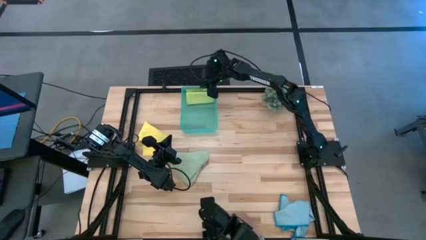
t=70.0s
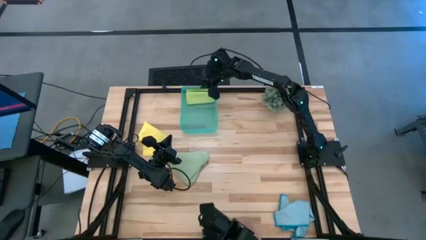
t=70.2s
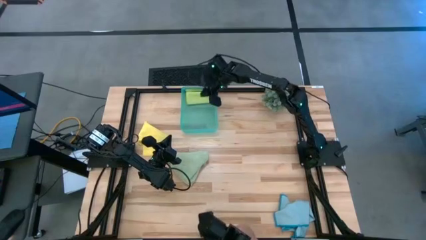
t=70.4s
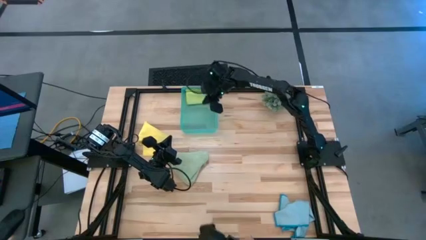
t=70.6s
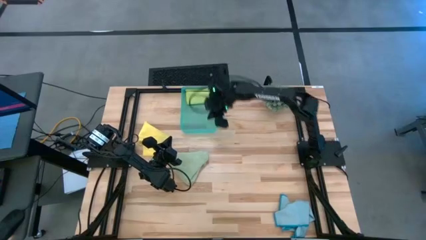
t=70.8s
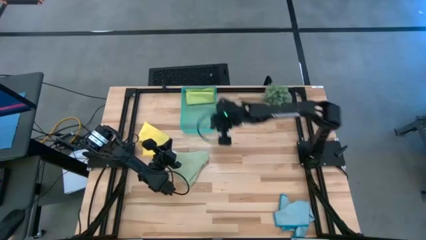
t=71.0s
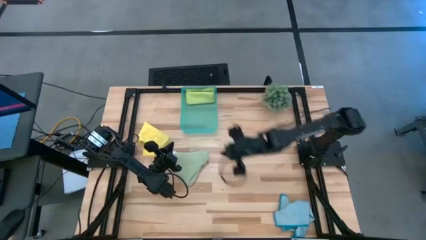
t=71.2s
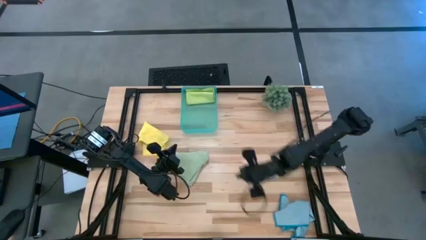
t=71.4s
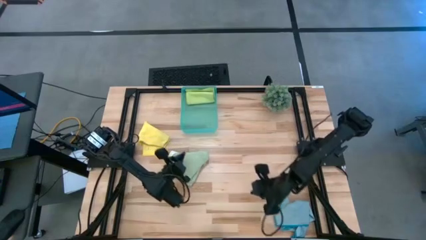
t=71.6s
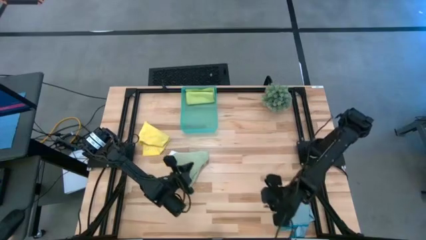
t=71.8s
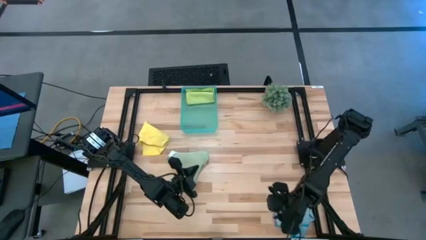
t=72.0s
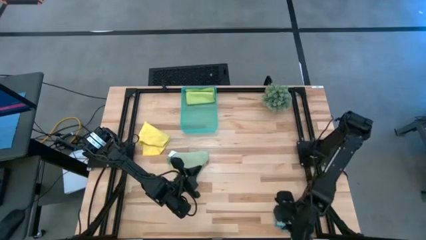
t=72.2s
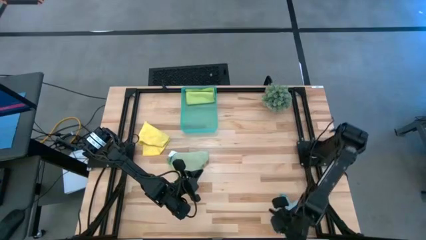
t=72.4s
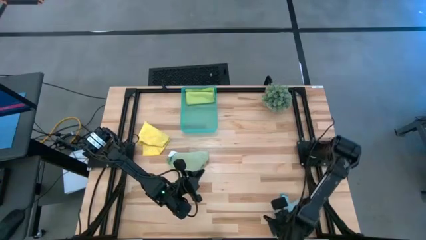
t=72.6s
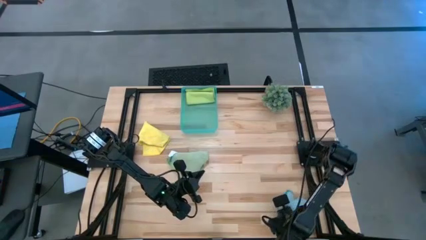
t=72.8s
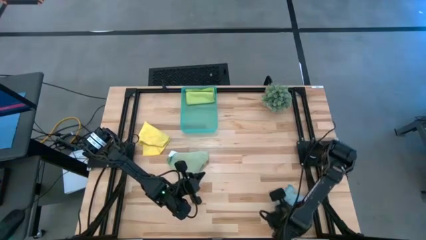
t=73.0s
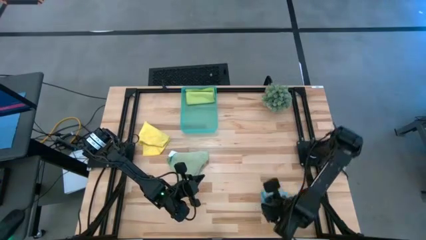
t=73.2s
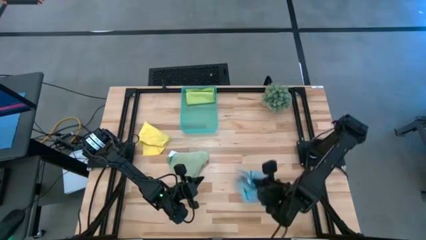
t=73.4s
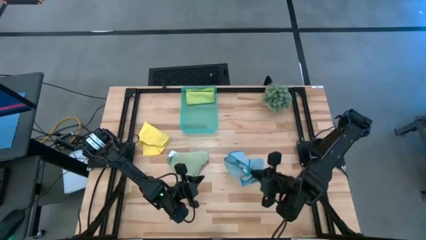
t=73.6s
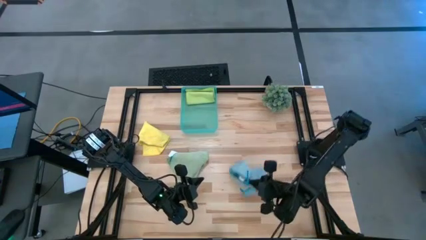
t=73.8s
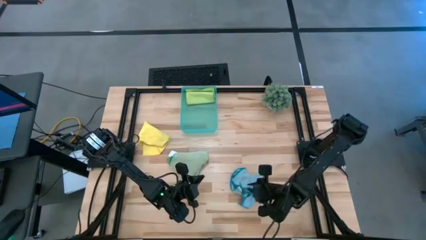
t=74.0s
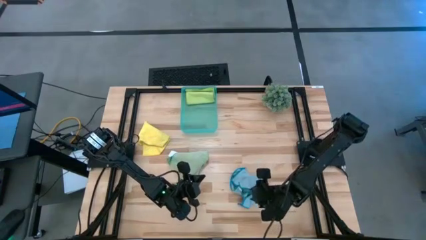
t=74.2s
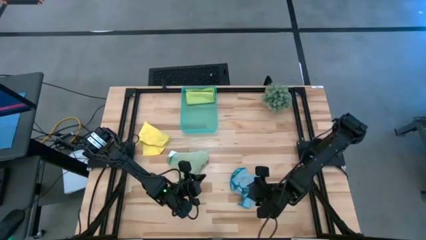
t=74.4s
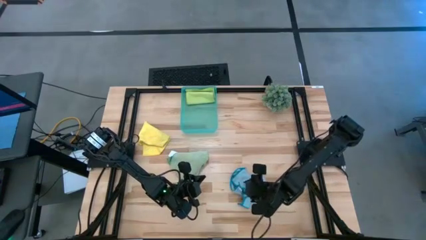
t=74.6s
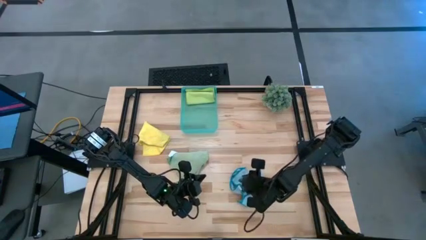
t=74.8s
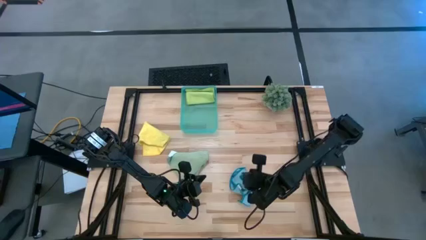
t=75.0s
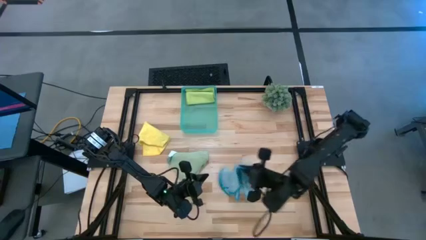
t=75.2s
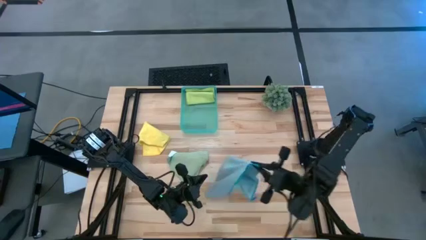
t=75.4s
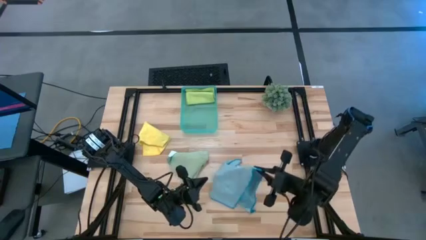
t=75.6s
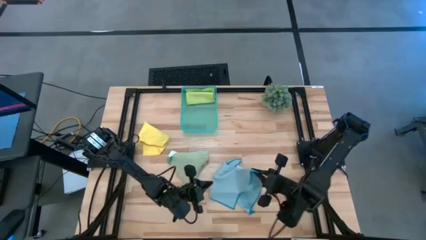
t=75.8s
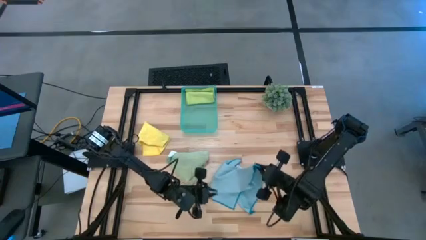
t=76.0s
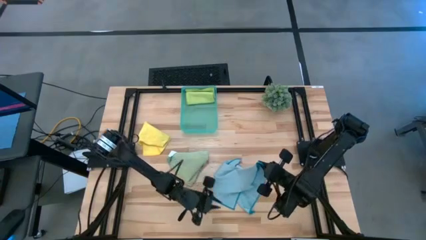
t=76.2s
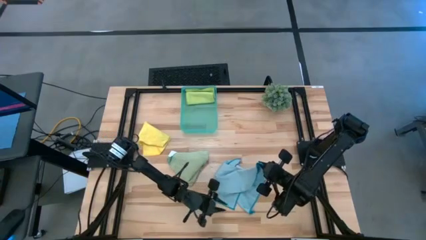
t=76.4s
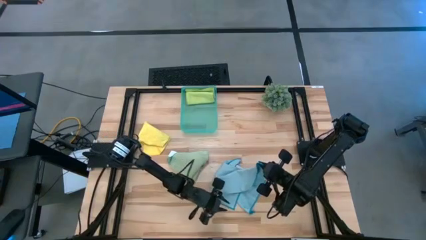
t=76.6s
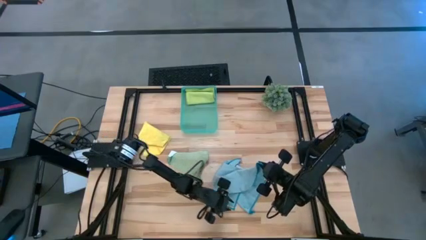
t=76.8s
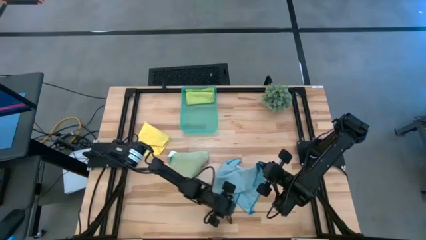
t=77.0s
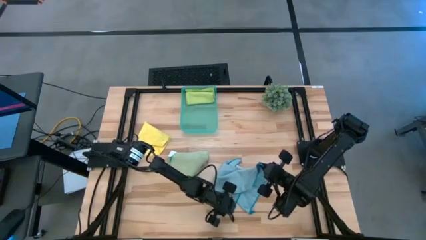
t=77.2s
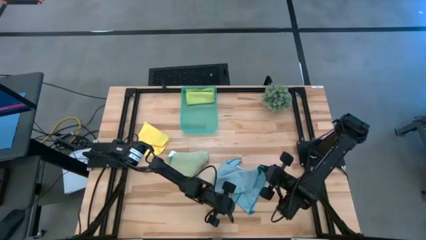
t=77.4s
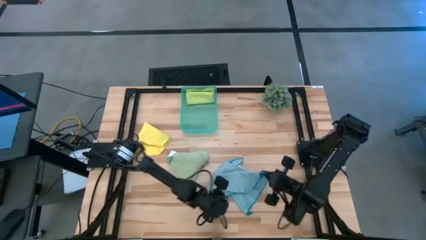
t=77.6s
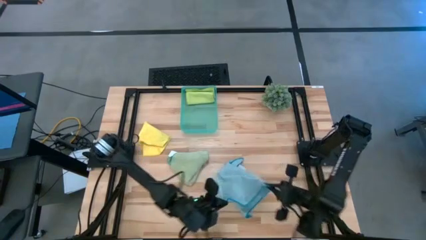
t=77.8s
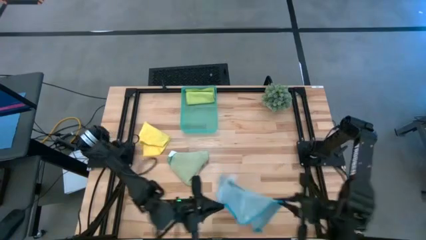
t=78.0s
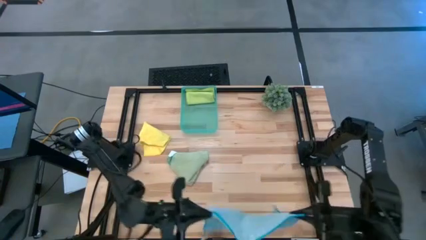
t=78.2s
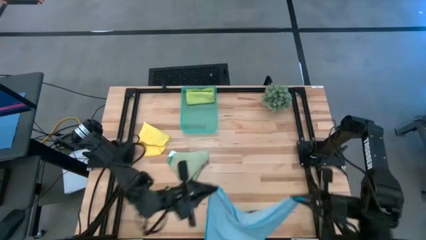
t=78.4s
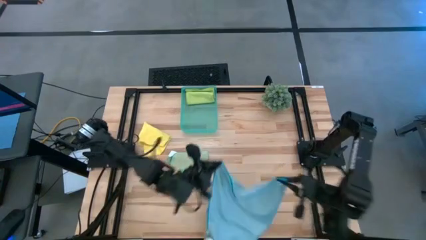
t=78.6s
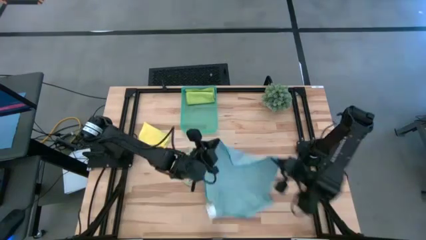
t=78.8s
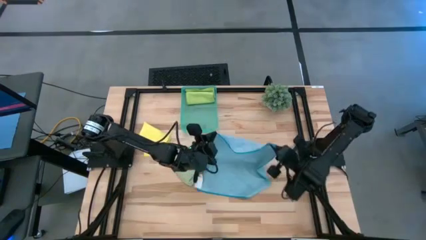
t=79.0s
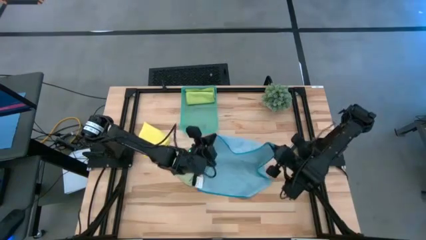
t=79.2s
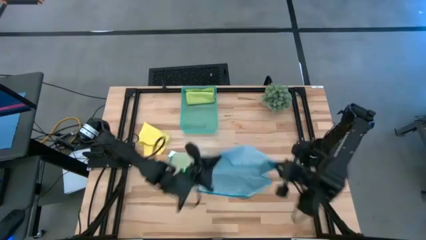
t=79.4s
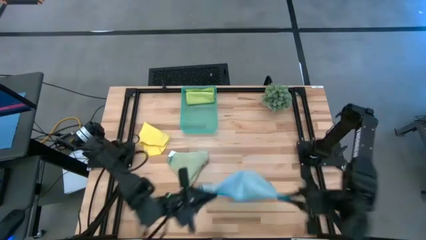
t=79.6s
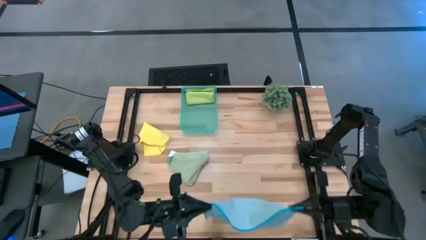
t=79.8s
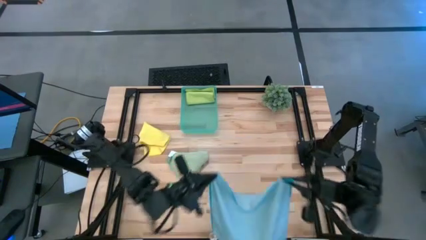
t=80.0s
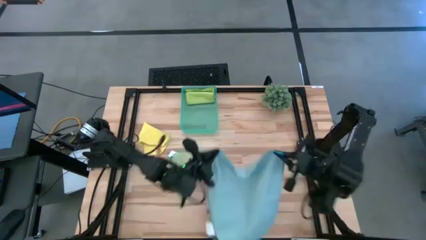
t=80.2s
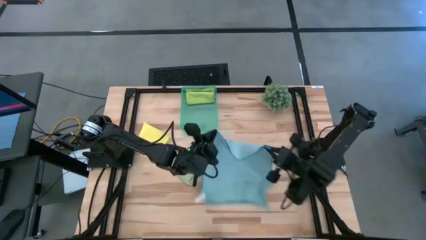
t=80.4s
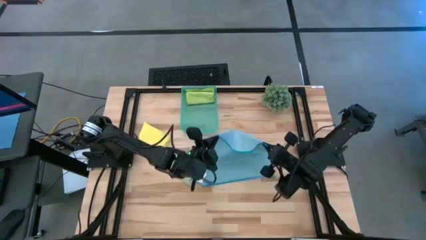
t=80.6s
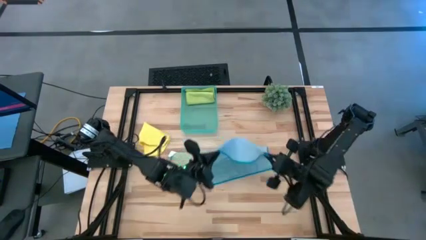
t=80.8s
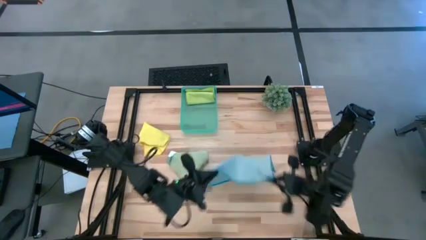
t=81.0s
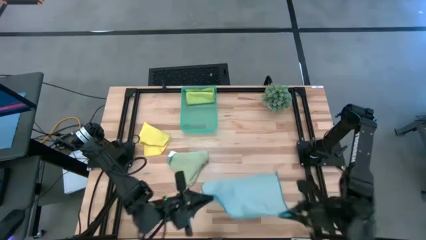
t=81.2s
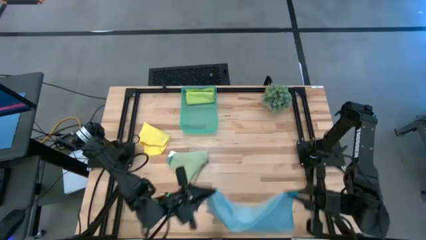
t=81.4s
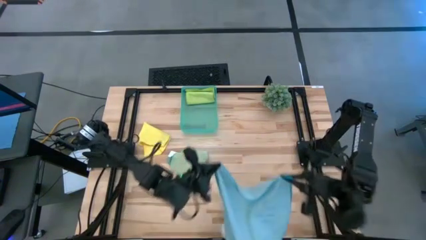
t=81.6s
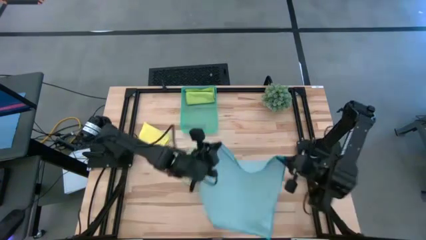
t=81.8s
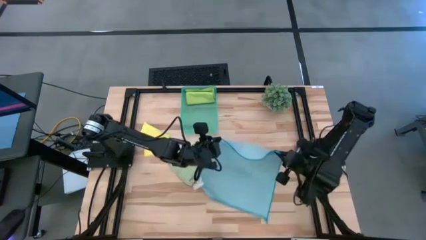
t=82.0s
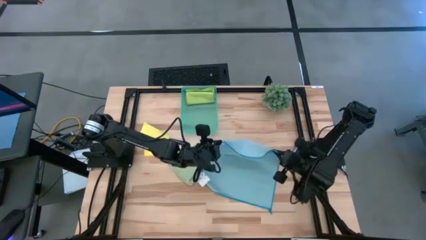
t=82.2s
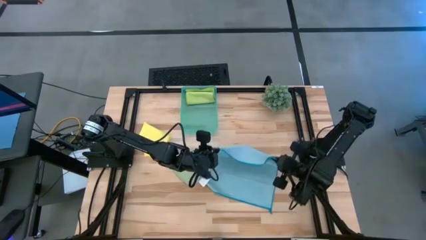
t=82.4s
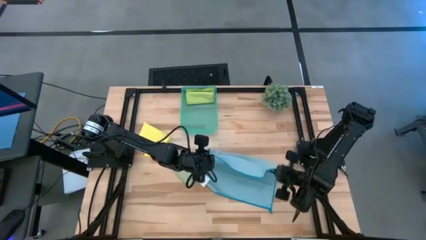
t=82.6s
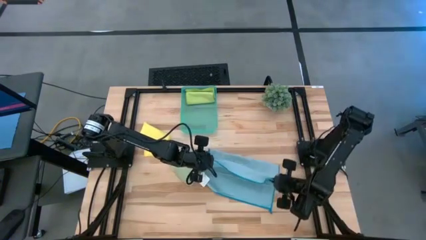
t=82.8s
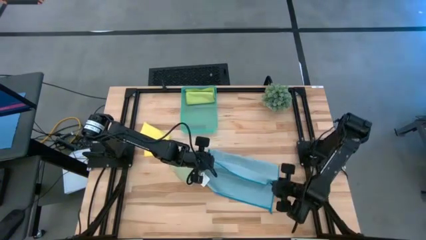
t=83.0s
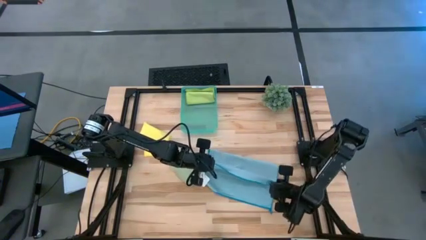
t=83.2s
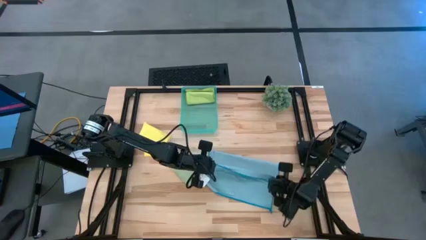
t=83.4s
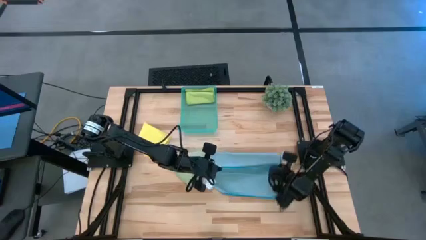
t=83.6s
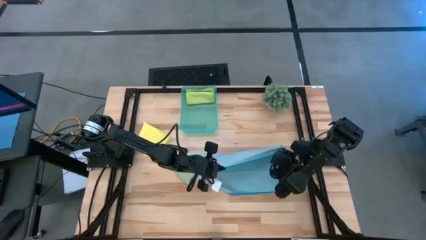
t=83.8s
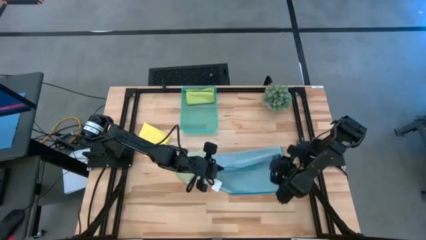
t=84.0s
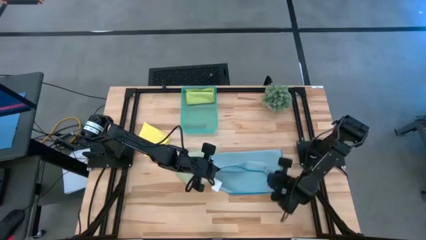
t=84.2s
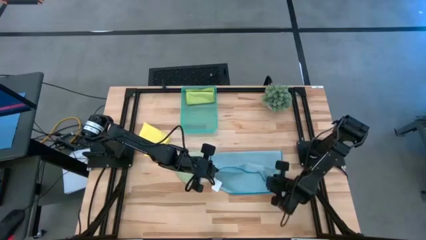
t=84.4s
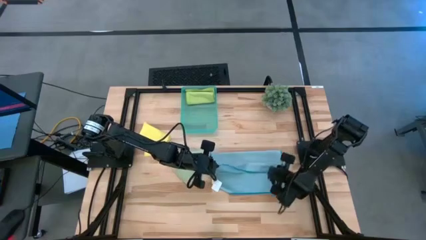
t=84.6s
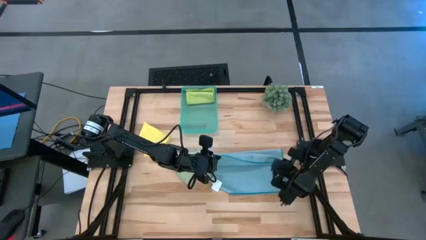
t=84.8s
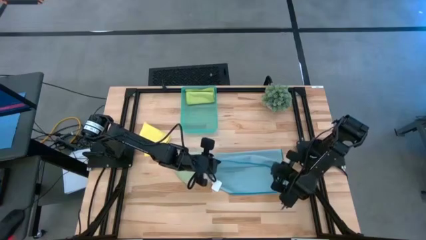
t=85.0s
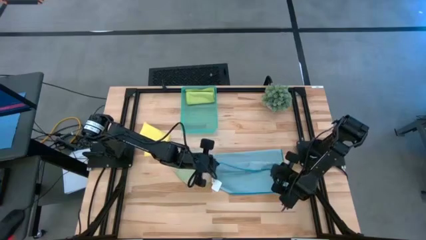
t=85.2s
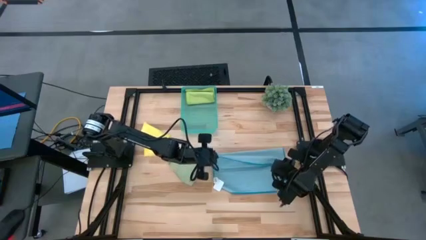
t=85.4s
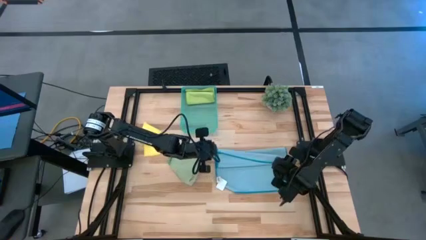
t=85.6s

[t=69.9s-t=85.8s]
Task: Fold microfiber towels
Fold the blue microfiber cloth

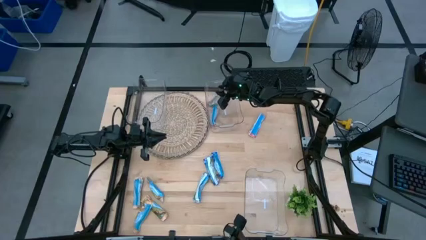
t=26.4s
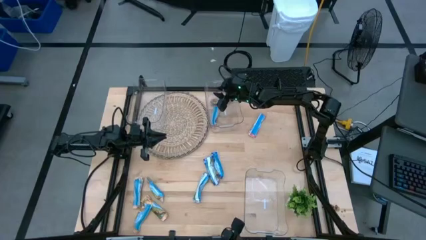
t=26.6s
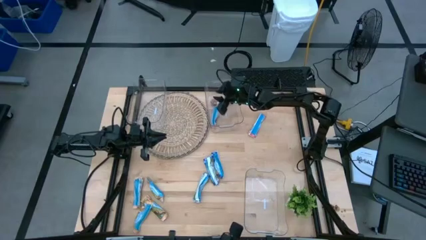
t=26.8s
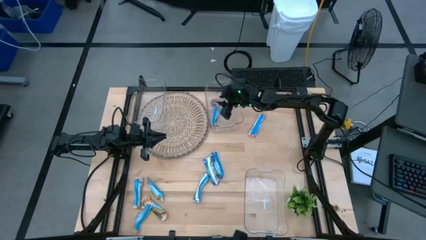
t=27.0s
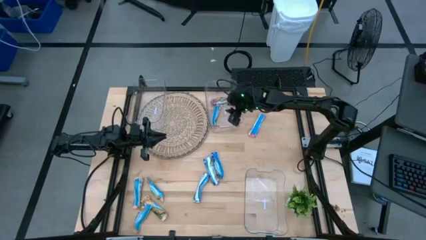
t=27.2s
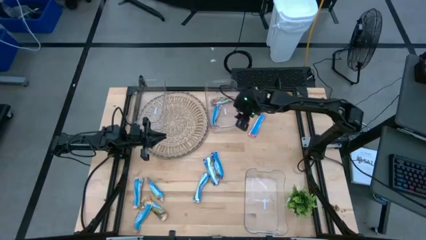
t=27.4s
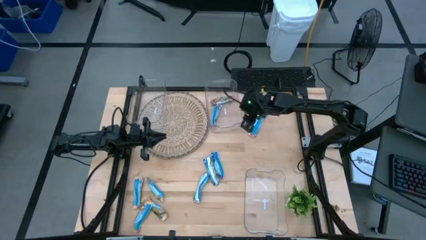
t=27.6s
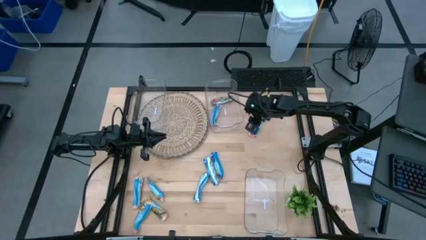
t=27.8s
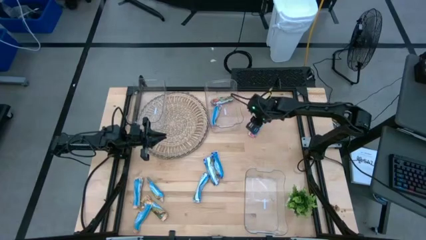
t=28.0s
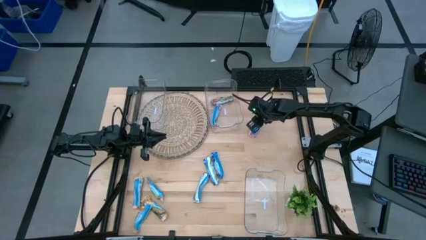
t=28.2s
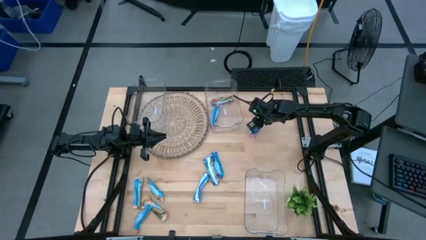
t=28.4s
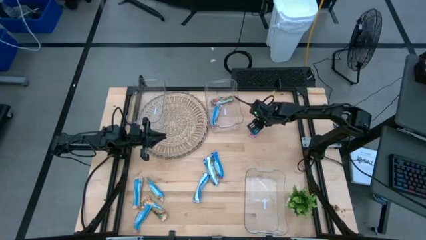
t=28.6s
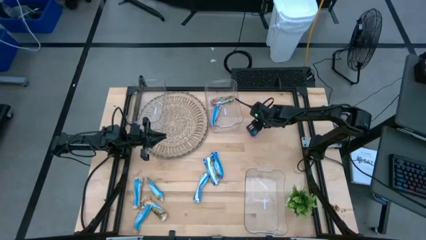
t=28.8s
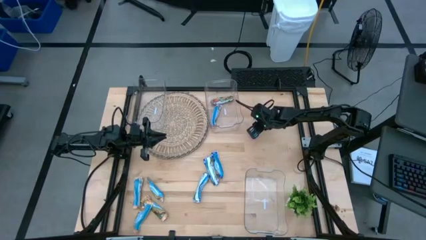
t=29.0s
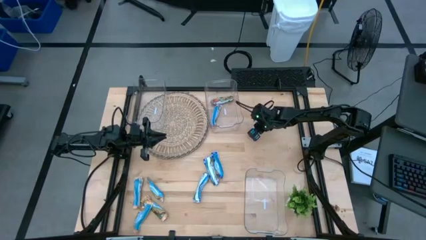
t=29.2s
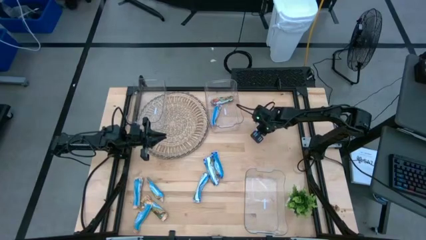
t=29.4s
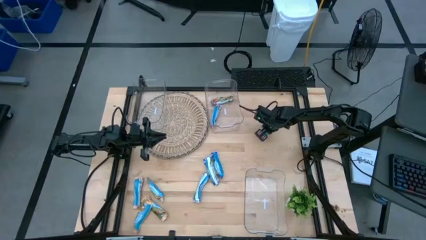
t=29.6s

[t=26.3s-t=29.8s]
Task: Pick and place Granola Bars by type
Put the red granola bar into the top right transparent bin
